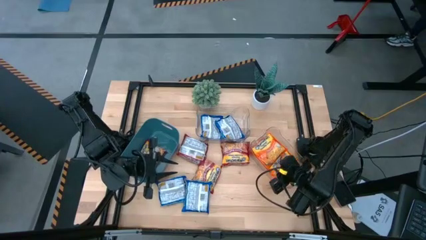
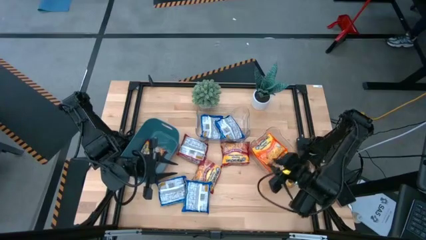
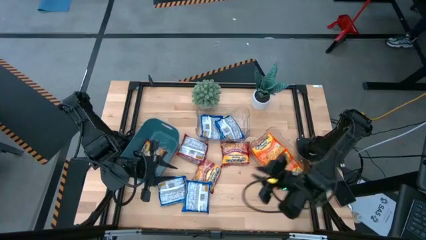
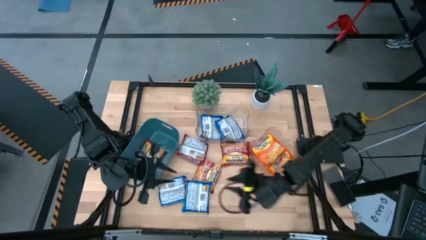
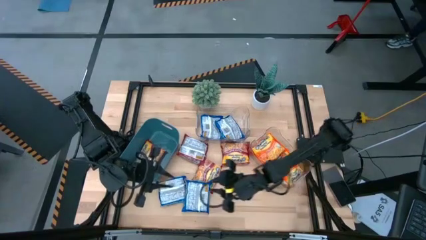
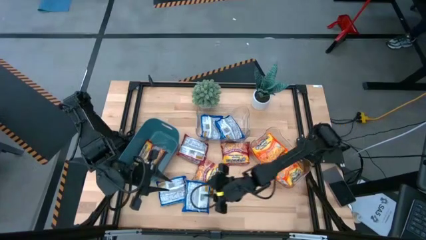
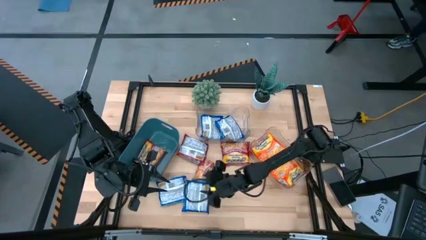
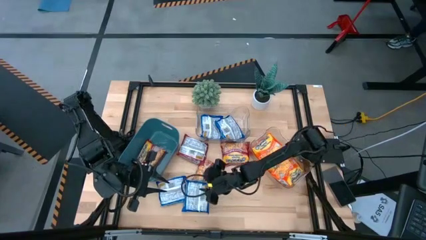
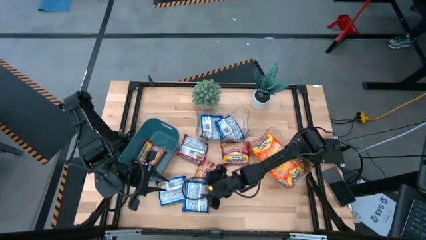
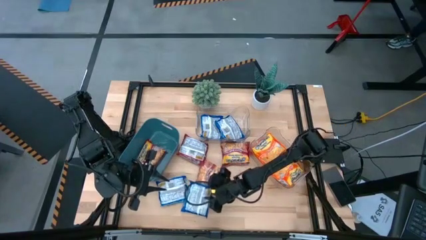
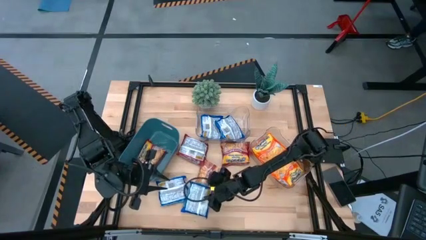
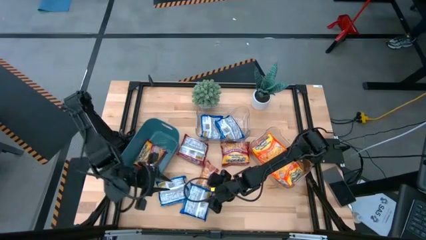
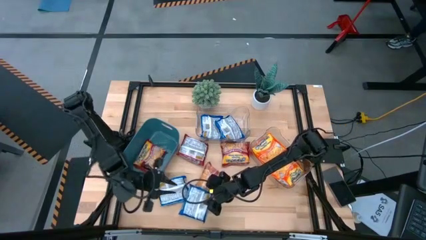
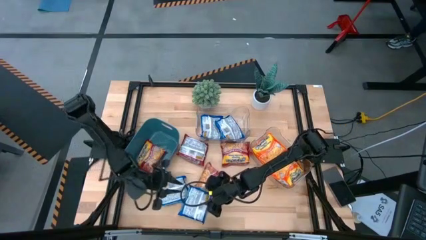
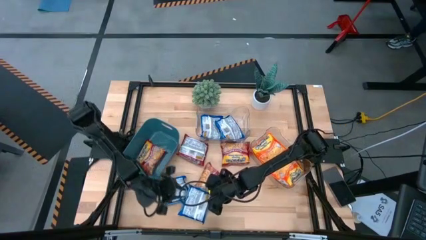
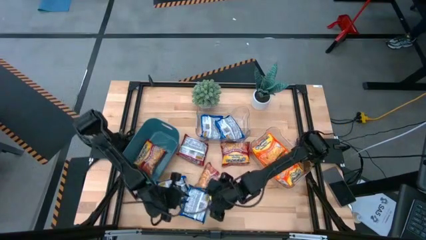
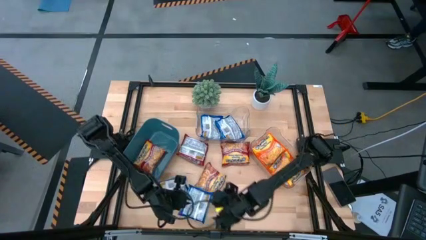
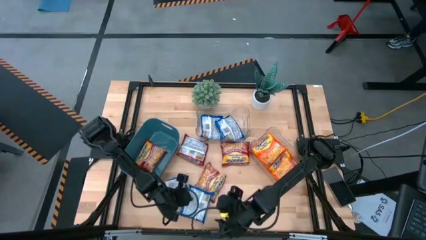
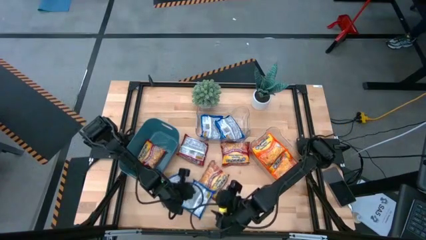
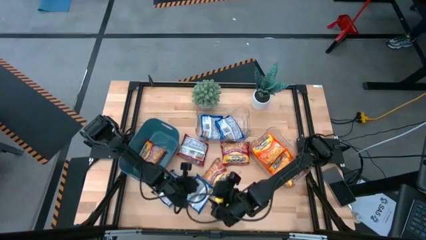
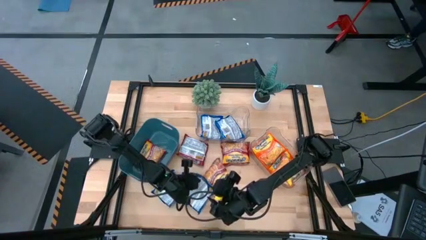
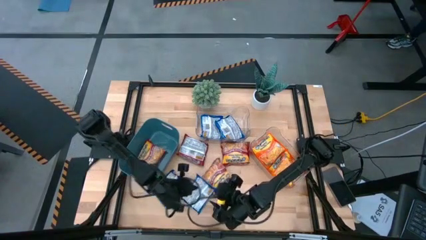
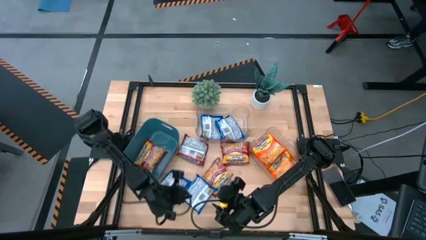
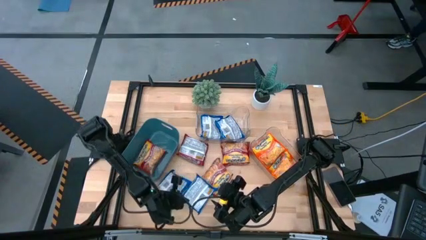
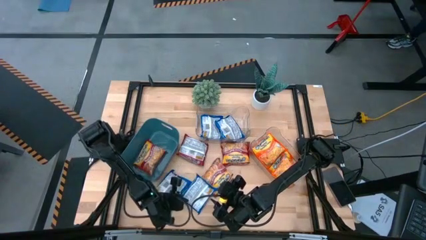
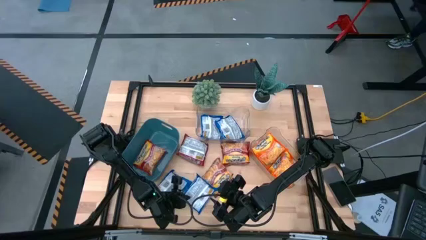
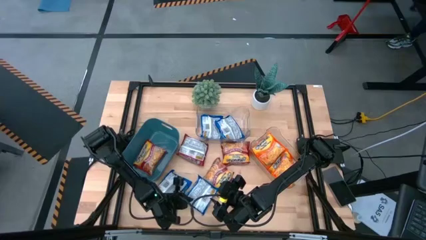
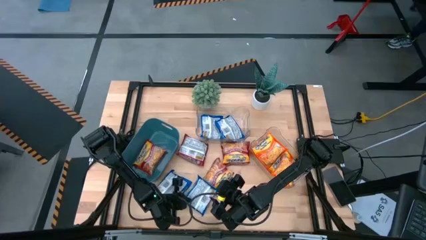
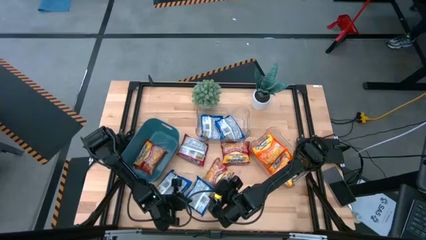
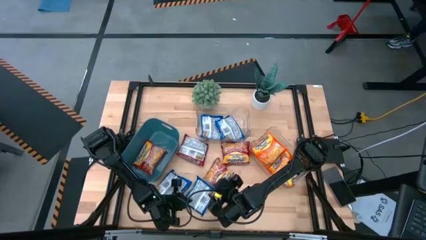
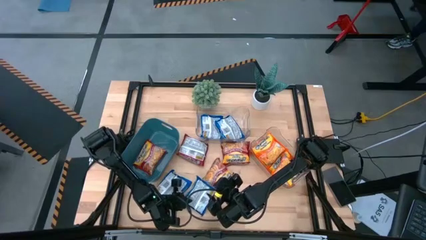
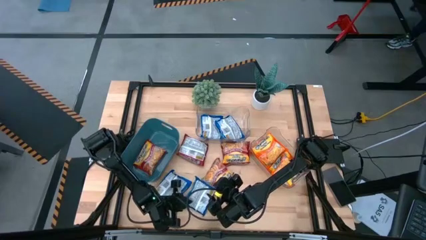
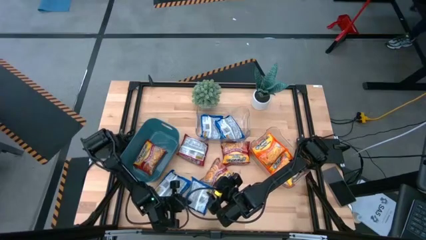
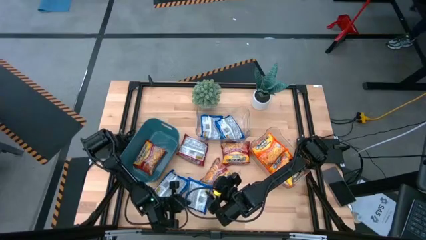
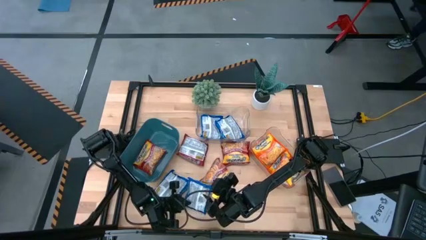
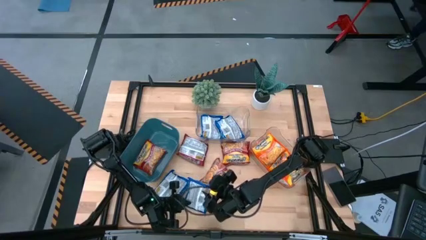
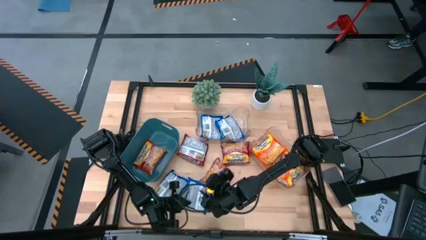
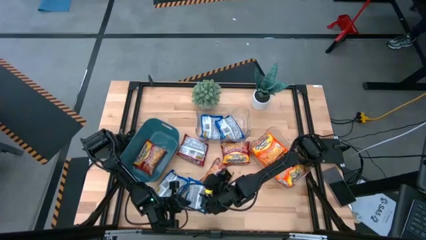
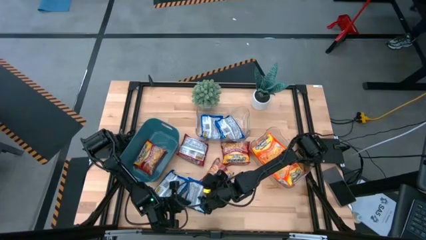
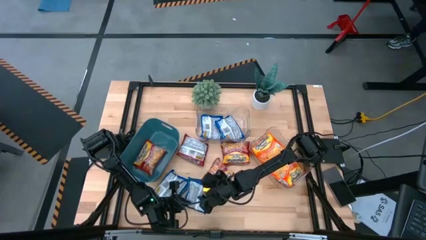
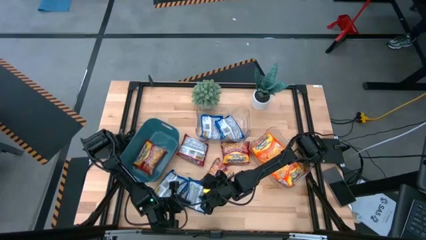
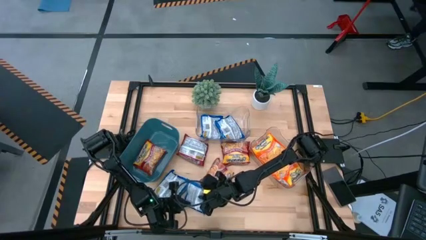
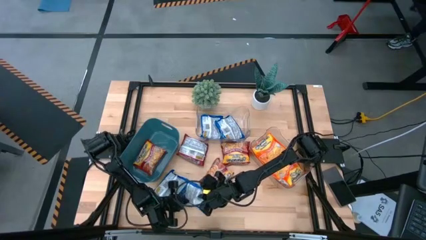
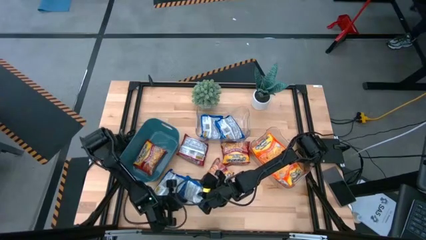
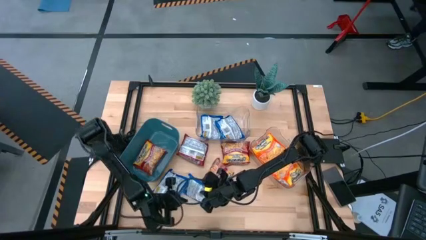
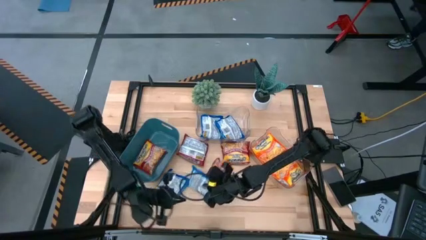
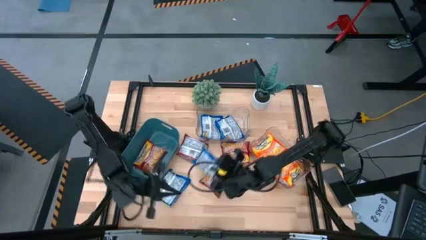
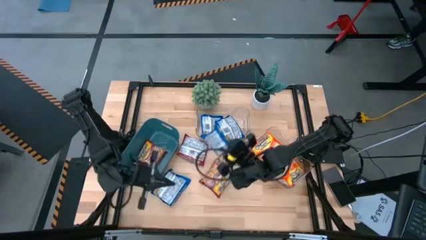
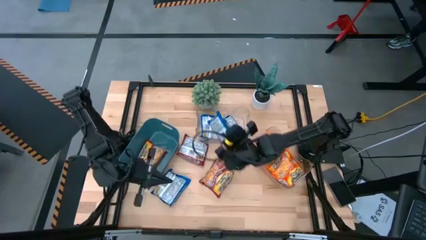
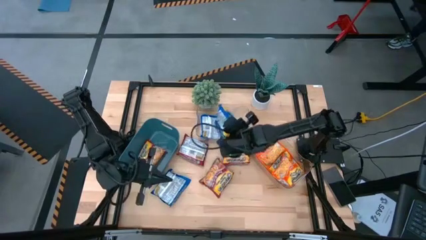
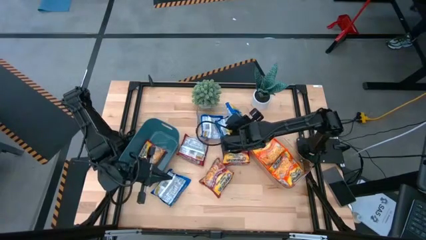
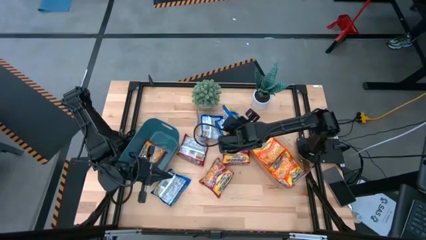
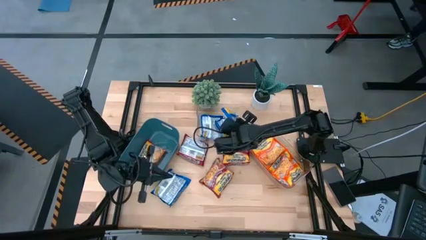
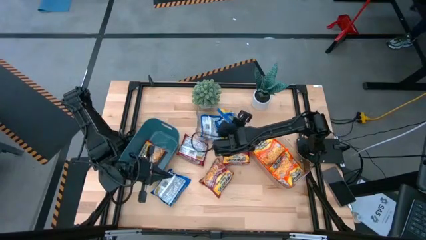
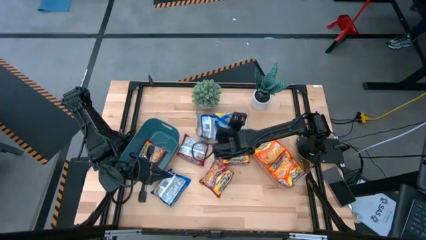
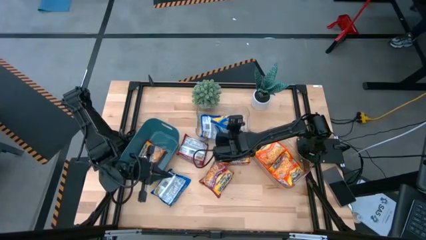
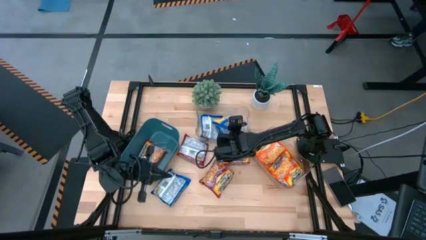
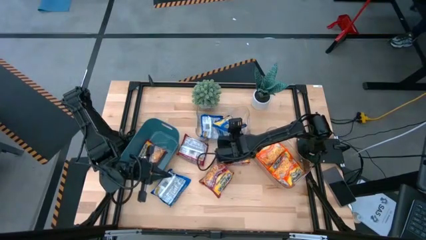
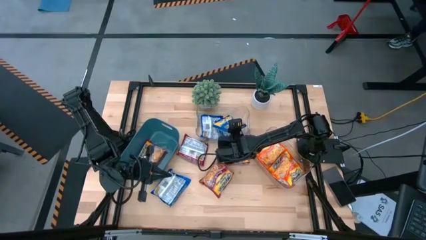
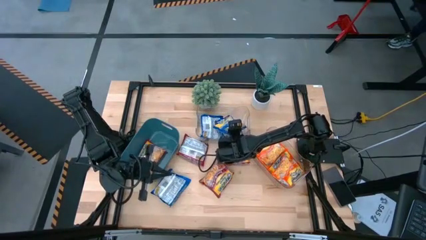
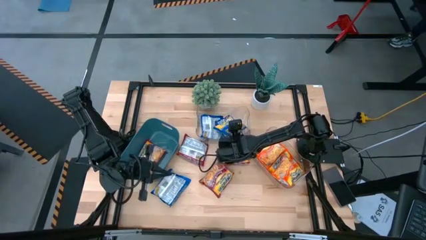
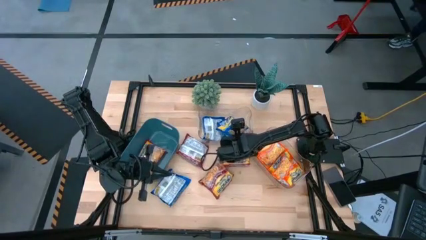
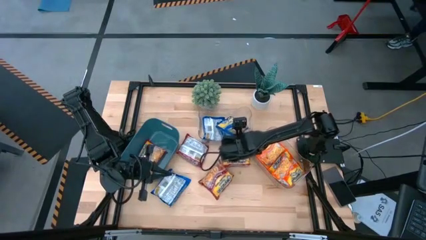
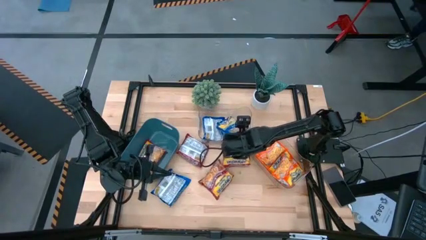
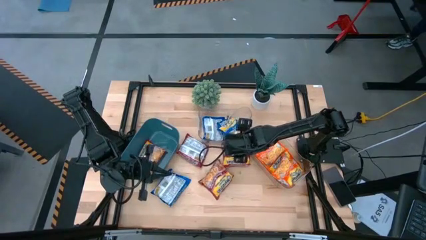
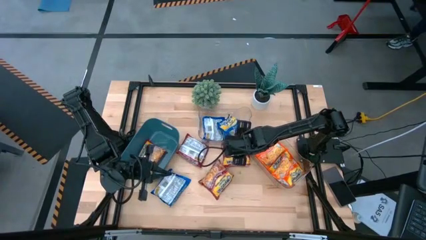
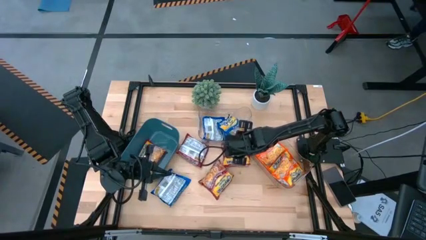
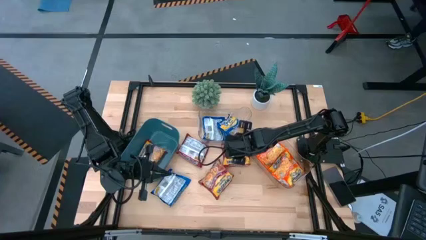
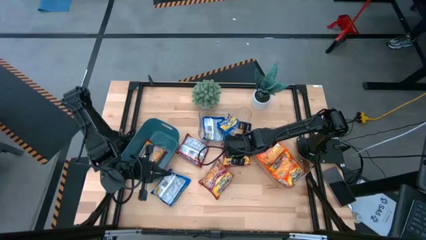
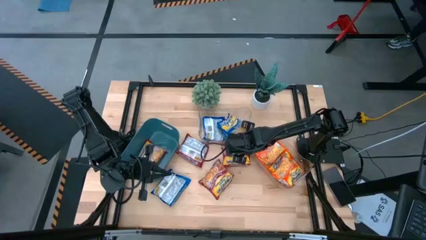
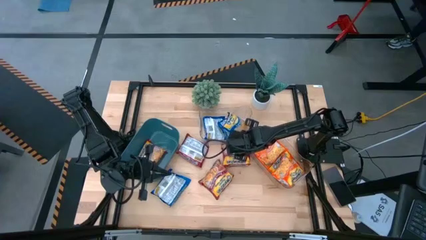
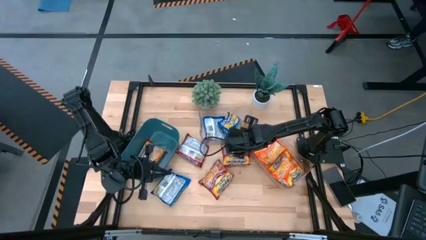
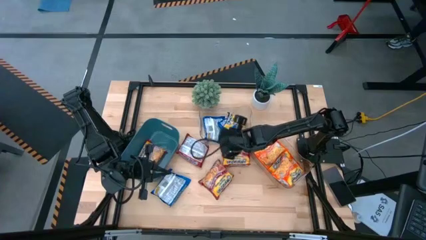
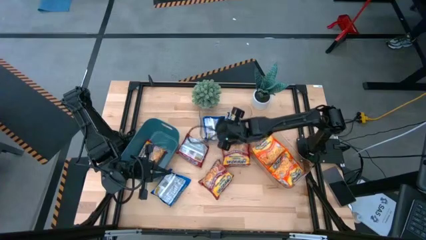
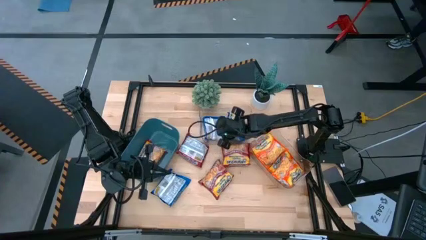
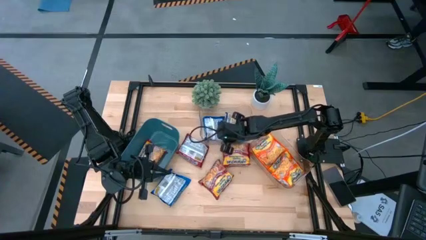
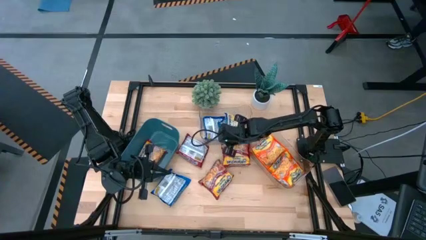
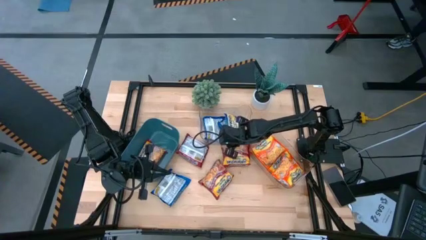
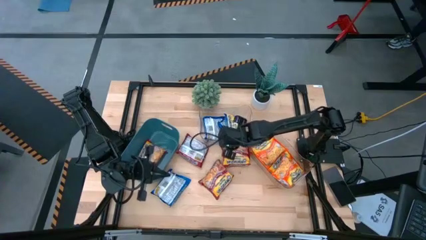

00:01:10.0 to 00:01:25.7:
Task: Sort Maruchan noodles
Stack the right blue noodle pack on top of the blue noodle pack in the left transparent bin
